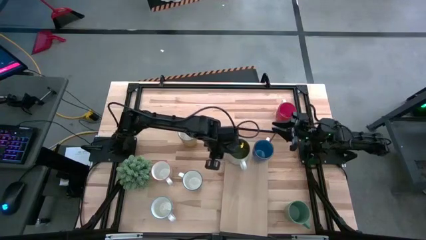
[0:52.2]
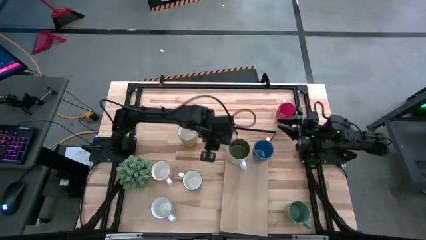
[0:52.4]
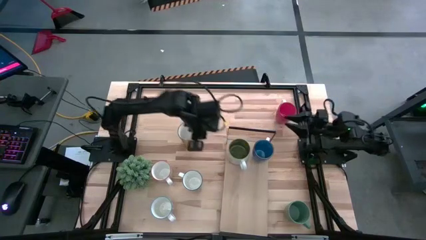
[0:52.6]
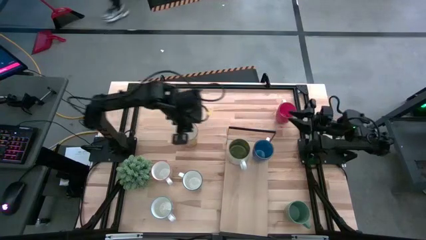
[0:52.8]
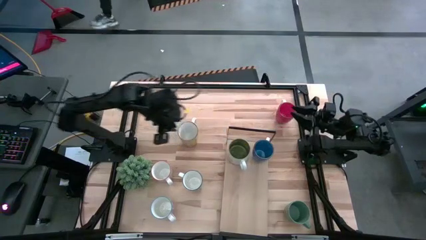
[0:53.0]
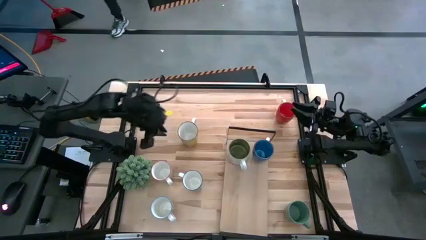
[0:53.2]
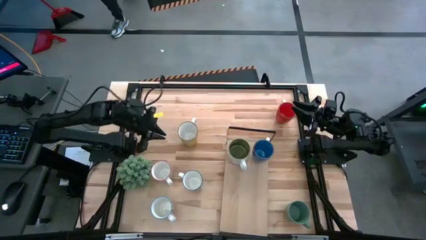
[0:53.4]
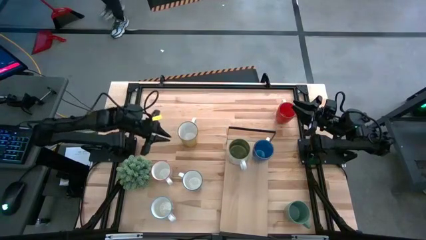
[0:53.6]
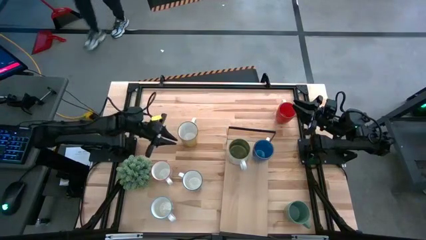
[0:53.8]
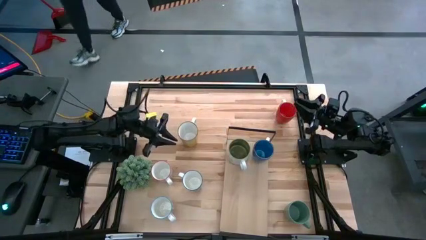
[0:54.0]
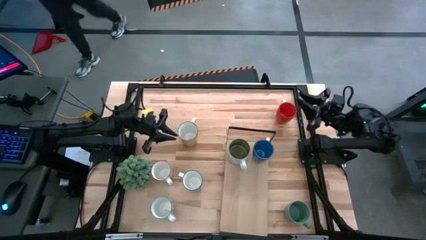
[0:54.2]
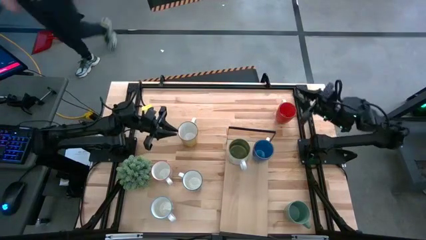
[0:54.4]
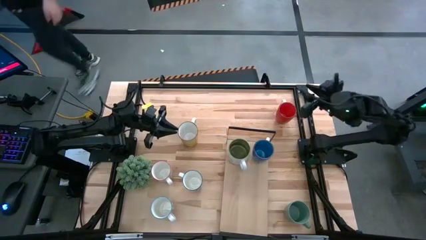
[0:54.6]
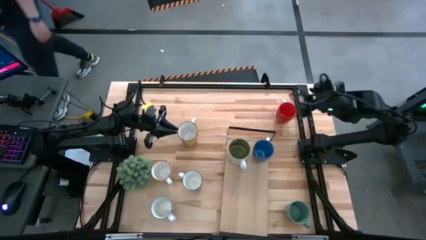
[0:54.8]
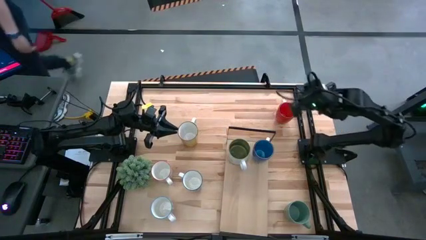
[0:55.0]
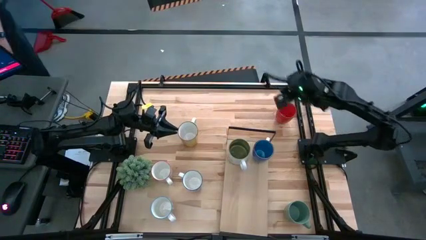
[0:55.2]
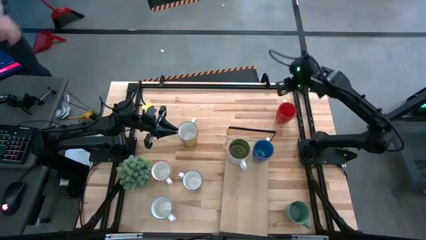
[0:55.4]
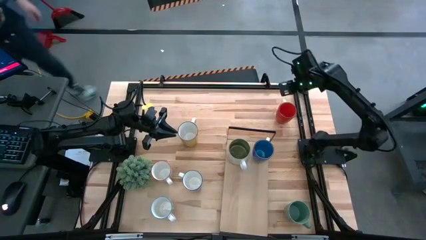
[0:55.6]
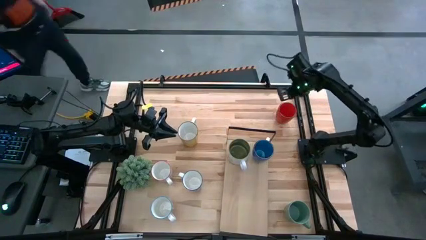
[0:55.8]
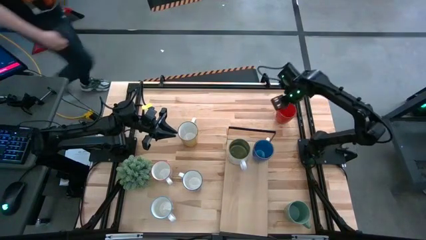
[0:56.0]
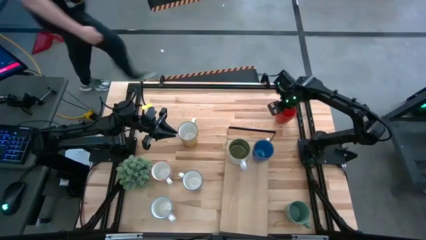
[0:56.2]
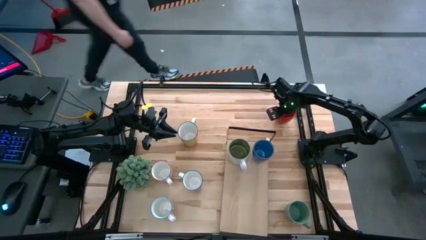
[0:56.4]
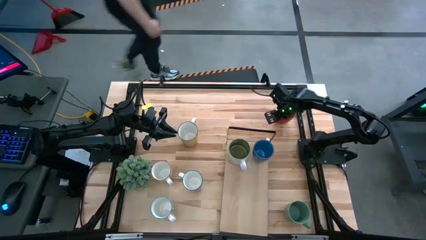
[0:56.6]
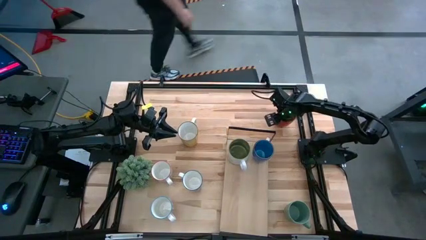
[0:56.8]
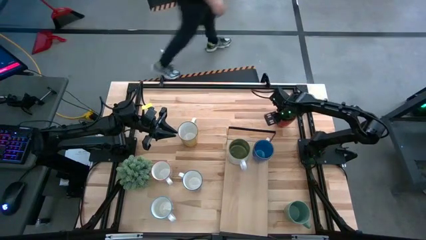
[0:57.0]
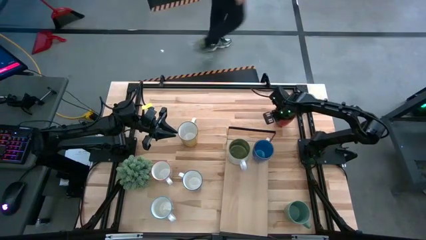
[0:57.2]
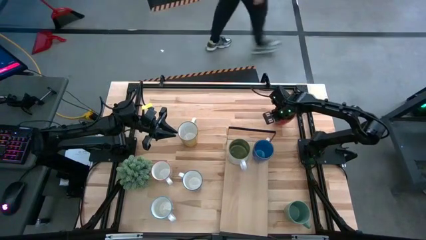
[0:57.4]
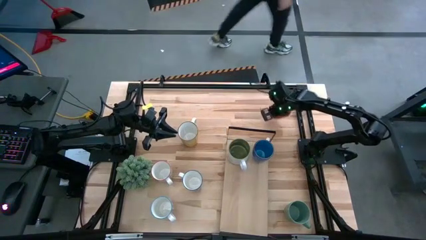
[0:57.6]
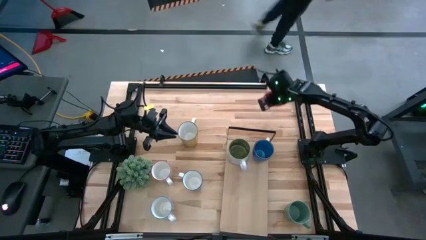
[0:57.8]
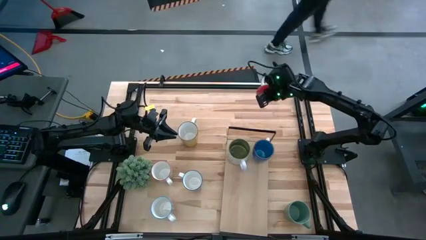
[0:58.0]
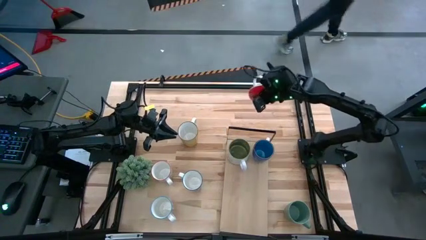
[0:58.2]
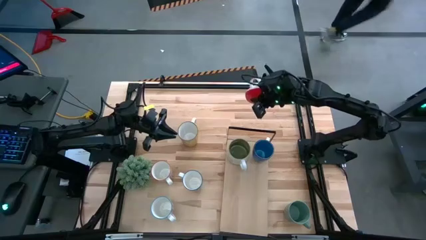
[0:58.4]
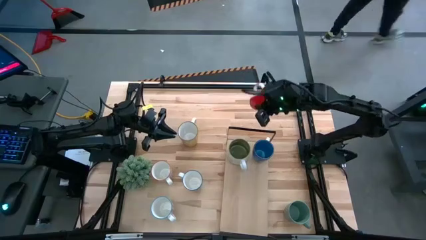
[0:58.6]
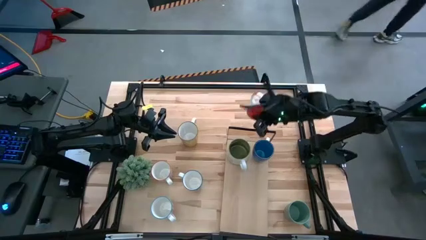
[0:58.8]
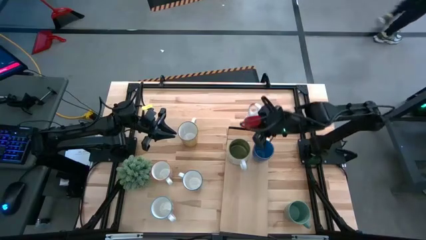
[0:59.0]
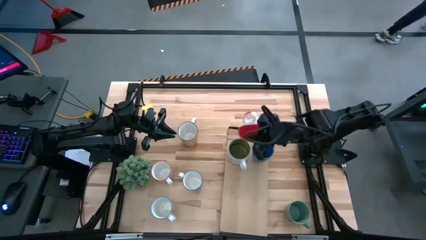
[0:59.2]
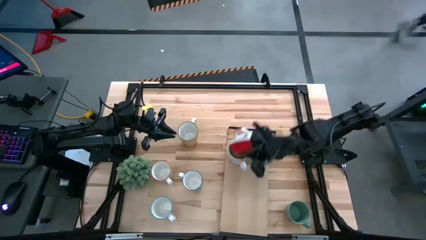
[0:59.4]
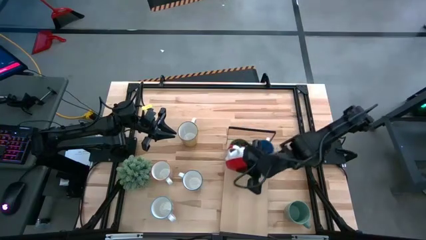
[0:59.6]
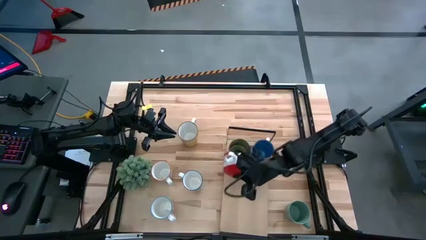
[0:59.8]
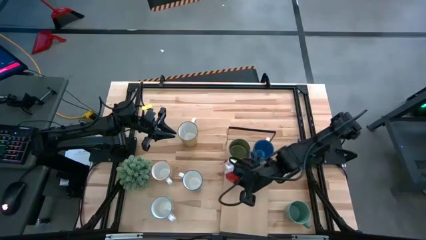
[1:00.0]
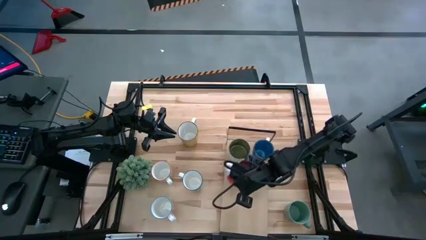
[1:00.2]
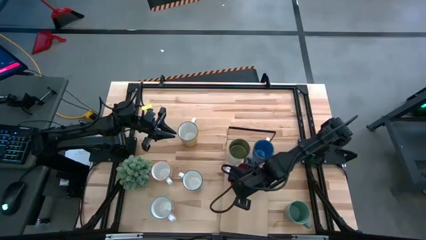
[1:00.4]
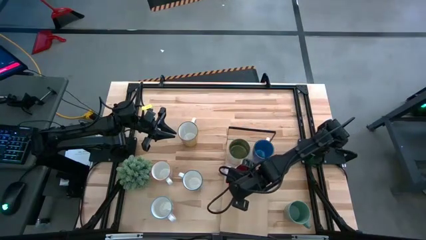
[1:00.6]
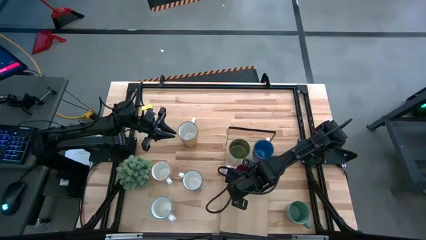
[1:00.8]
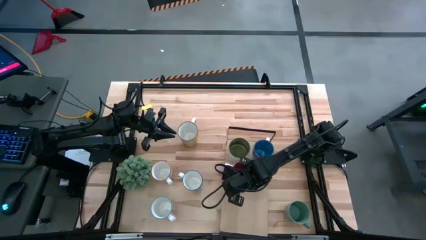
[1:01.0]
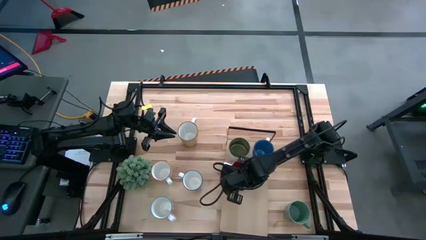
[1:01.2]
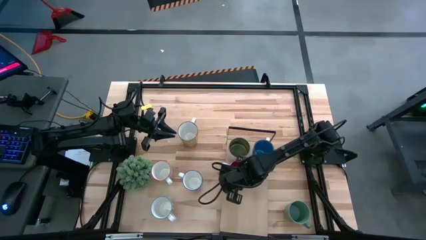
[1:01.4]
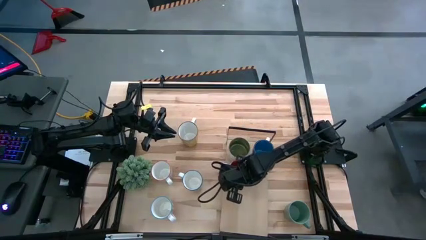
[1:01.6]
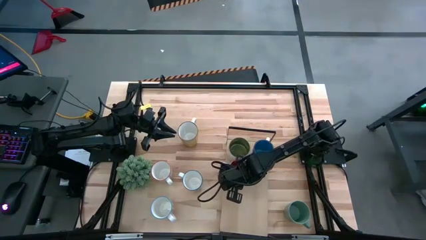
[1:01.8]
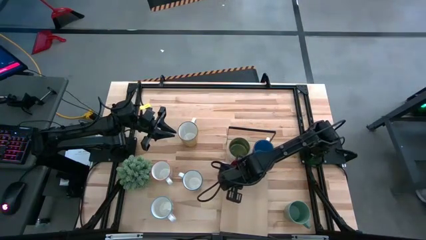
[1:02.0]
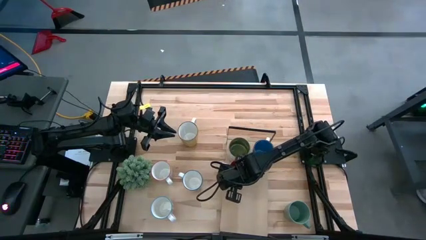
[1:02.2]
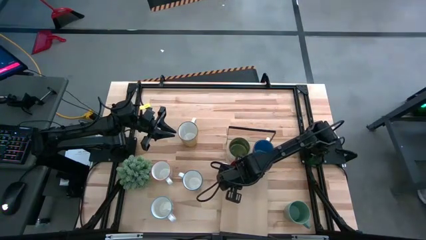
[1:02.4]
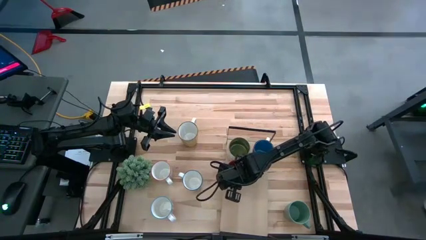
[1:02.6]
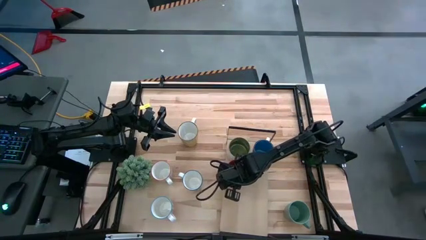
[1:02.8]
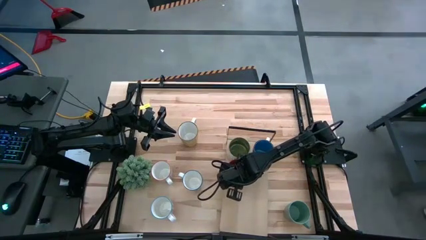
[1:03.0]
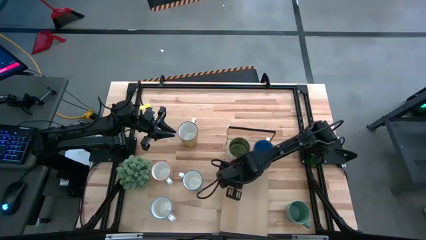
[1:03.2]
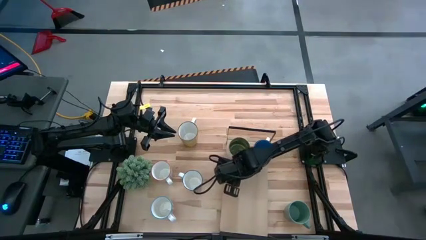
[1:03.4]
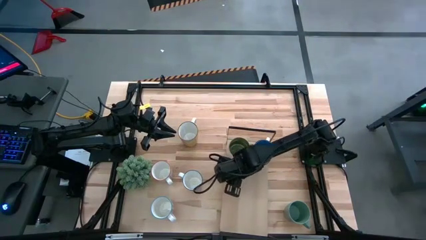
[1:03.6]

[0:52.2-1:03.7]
Task: Place coffee mugs
Put the red mug on the shelf
